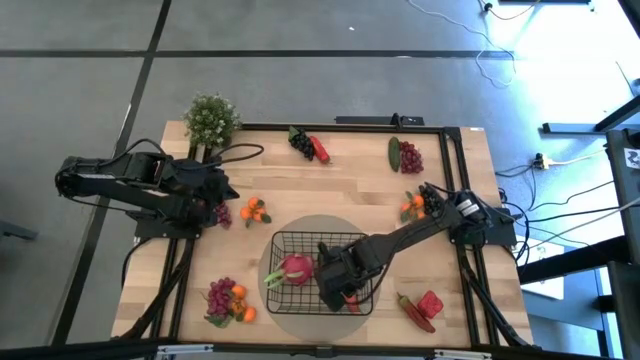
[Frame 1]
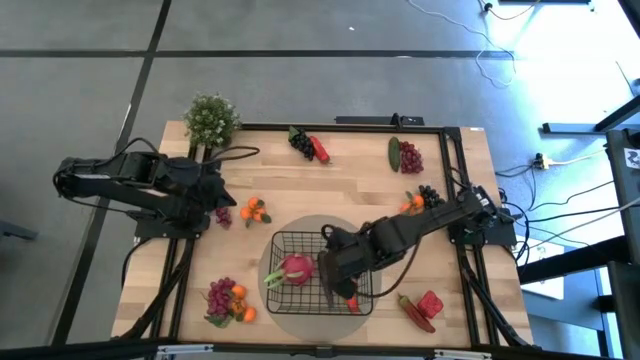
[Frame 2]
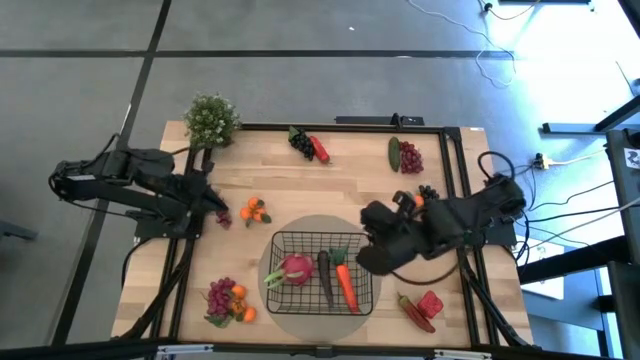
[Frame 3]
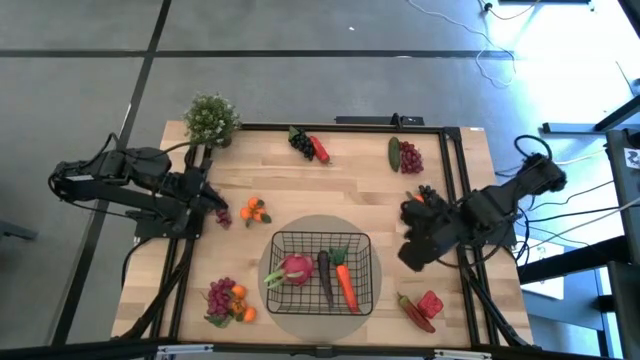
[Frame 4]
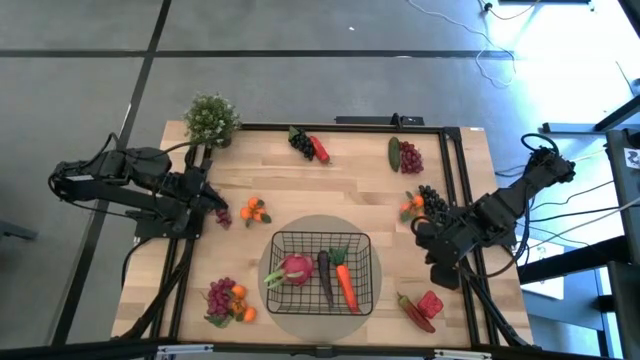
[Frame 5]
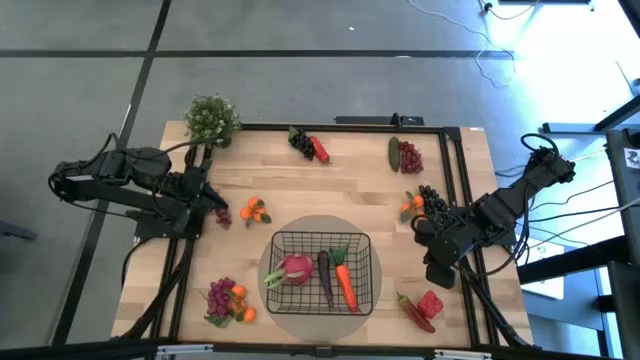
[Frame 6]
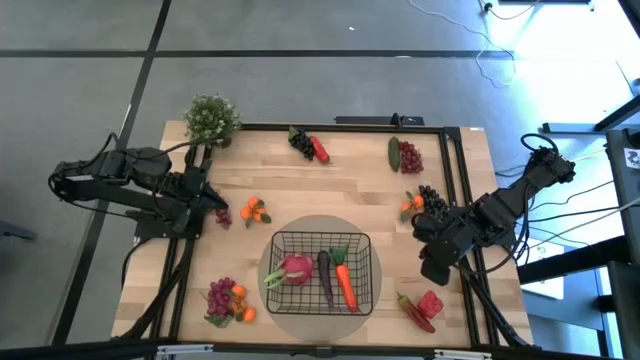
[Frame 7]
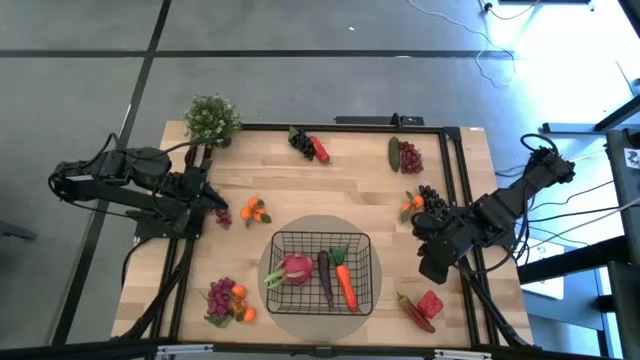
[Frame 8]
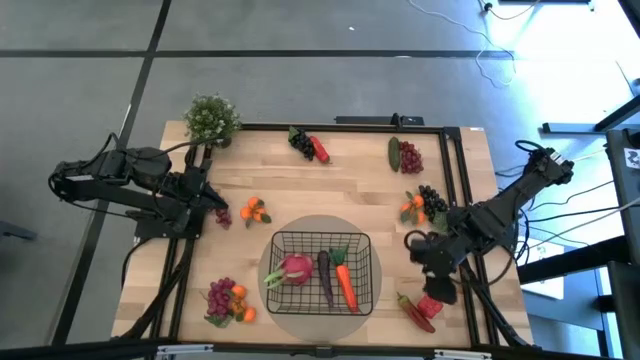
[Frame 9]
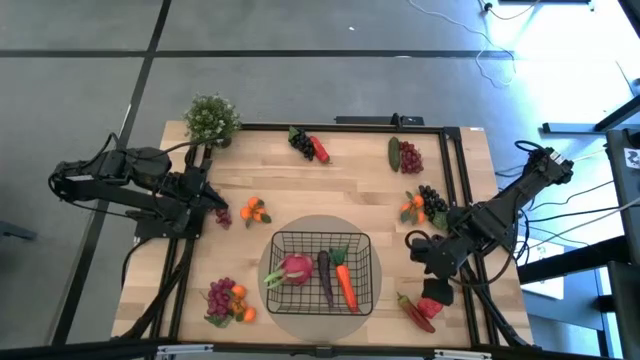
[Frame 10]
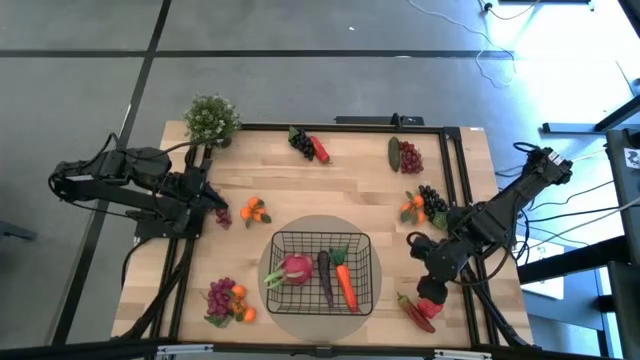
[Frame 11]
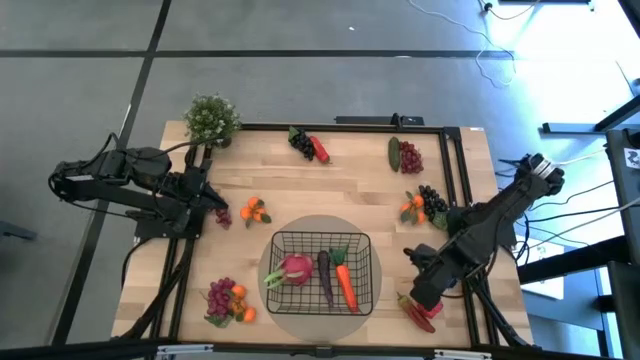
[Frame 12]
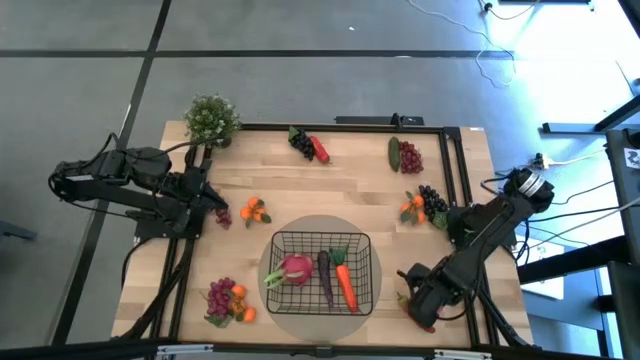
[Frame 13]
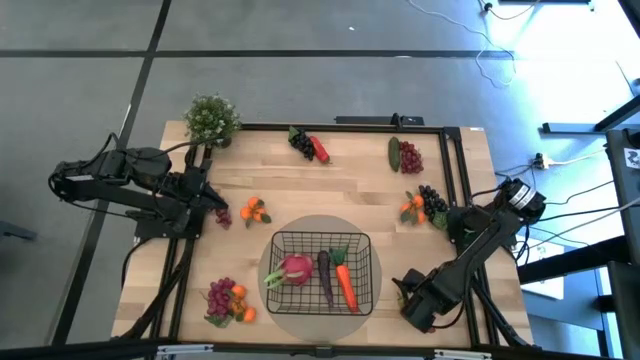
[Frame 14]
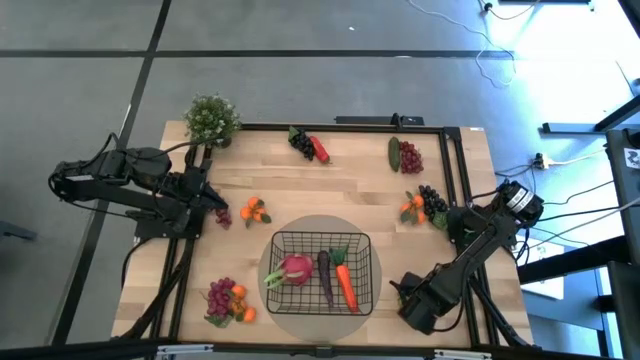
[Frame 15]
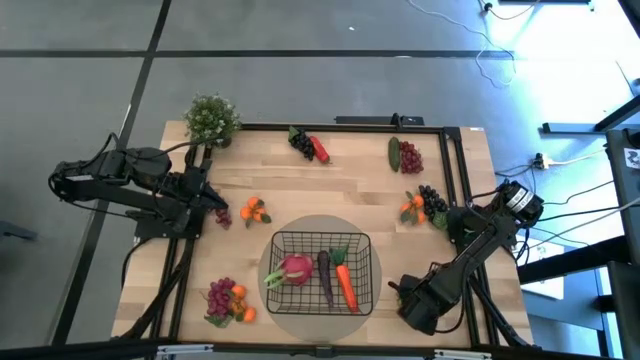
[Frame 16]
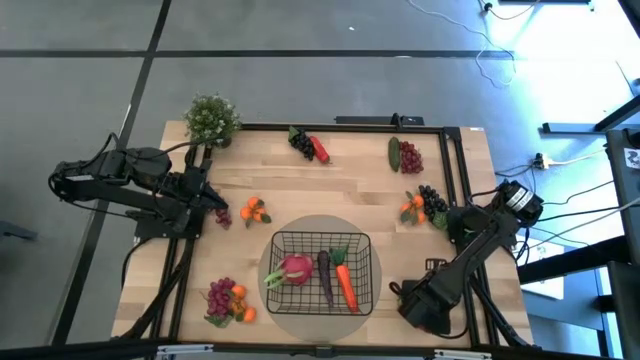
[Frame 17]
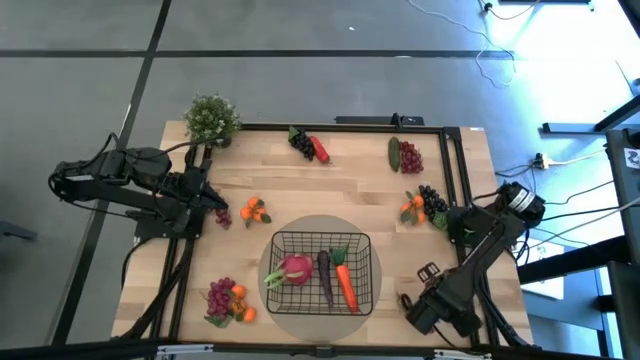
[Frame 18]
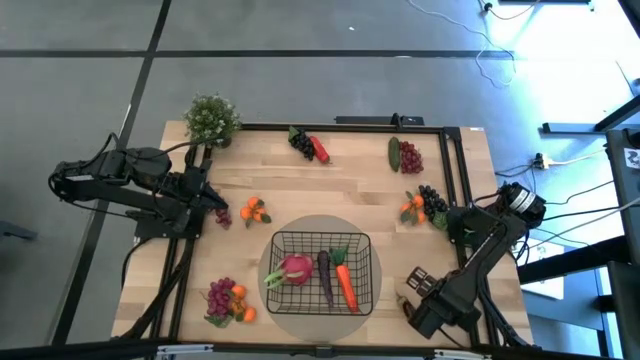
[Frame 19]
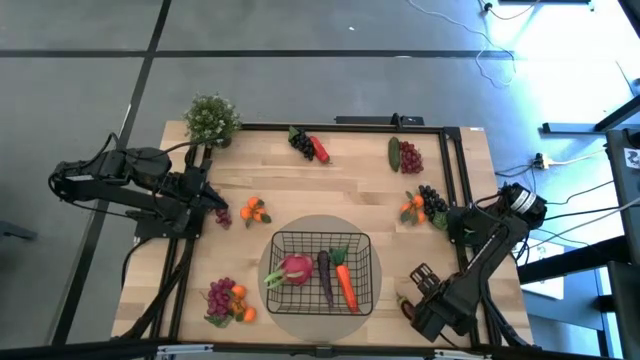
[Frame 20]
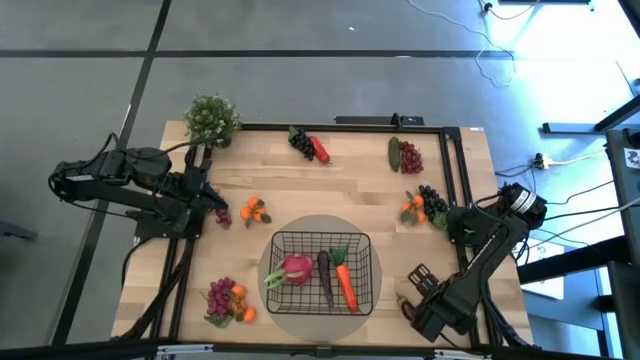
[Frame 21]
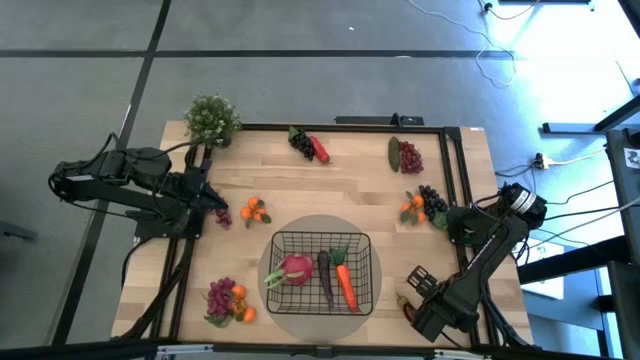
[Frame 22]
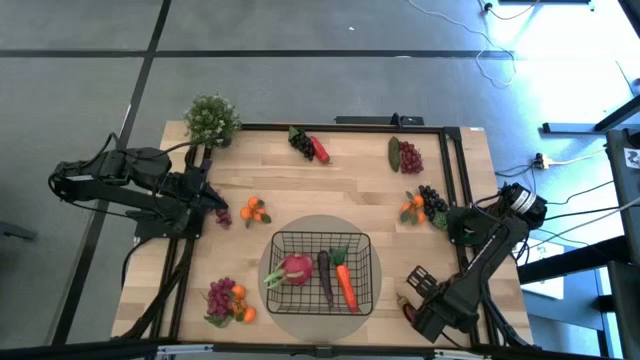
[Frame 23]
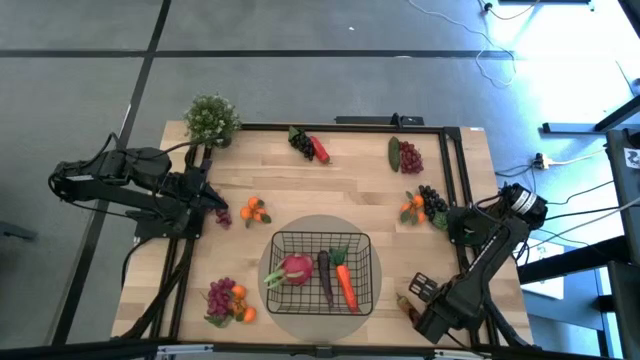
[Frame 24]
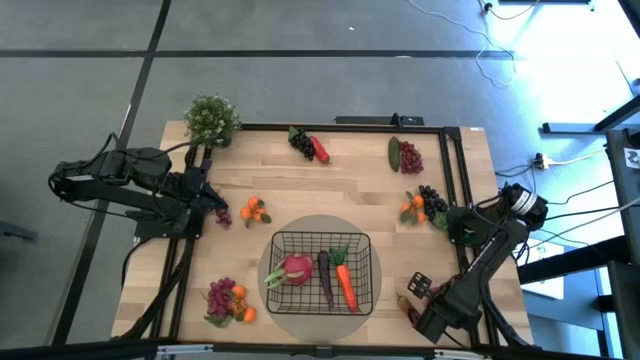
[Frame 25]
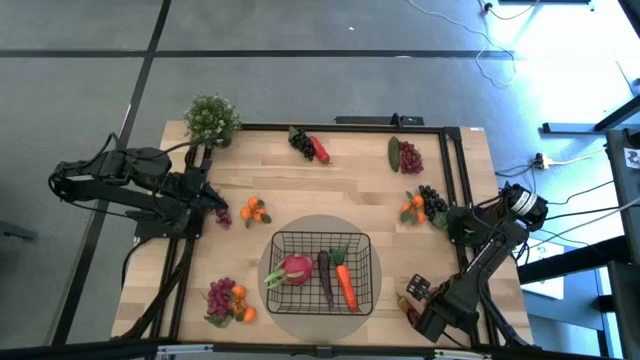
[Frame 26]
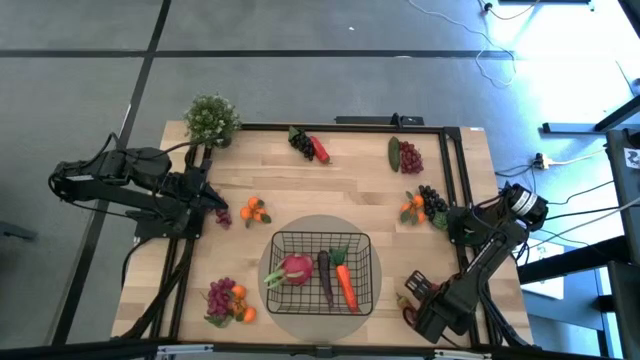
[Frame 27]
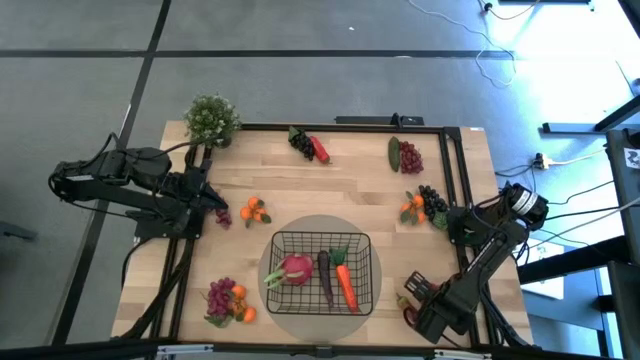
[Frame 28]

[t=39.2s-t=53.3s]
Task: Build produce basket
Put the red bell pepper into the black wire basket

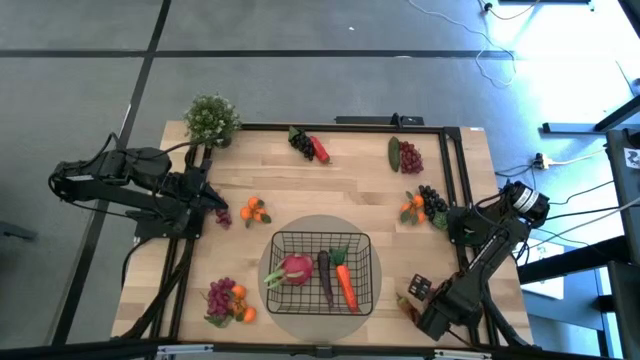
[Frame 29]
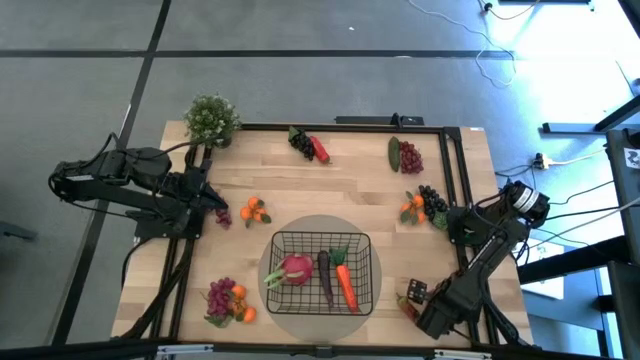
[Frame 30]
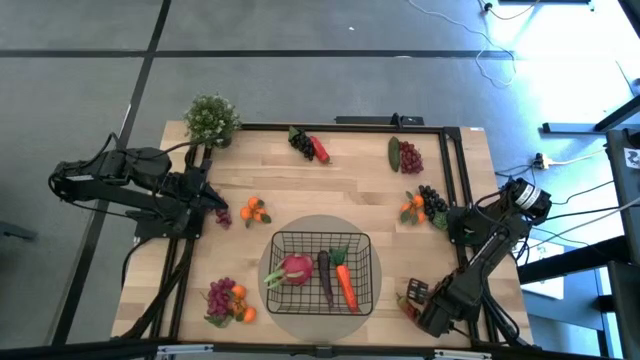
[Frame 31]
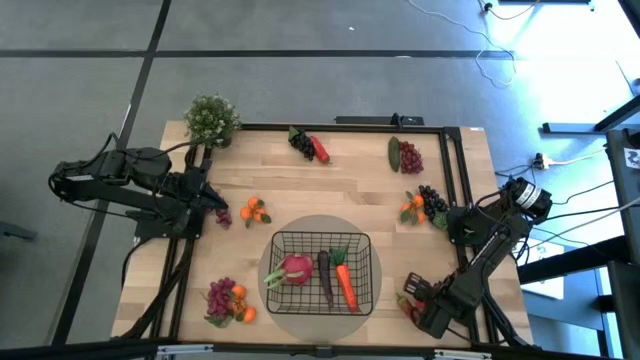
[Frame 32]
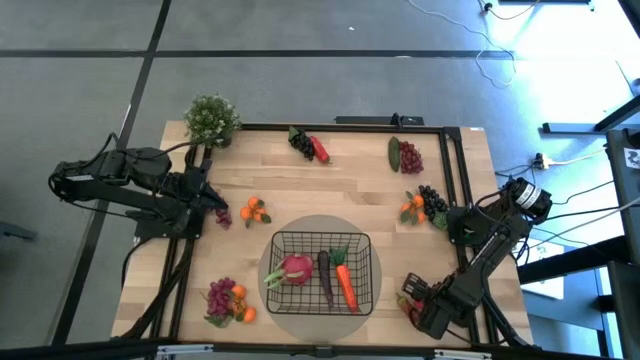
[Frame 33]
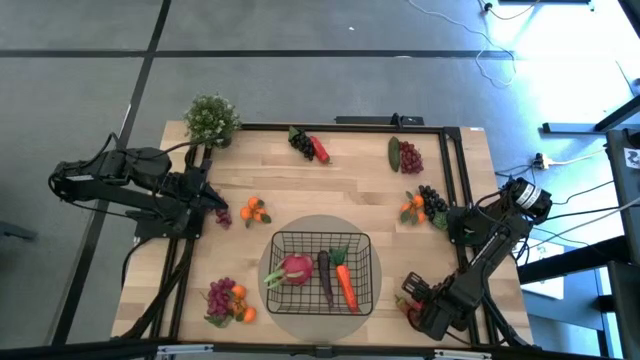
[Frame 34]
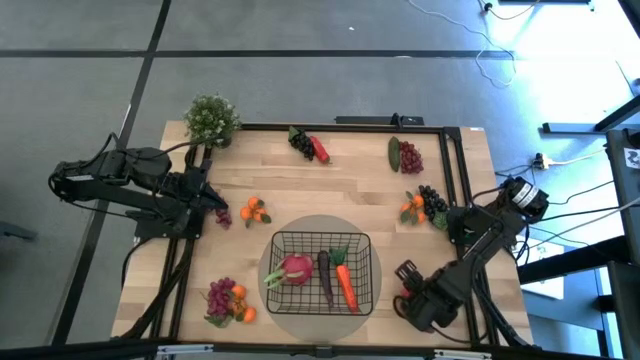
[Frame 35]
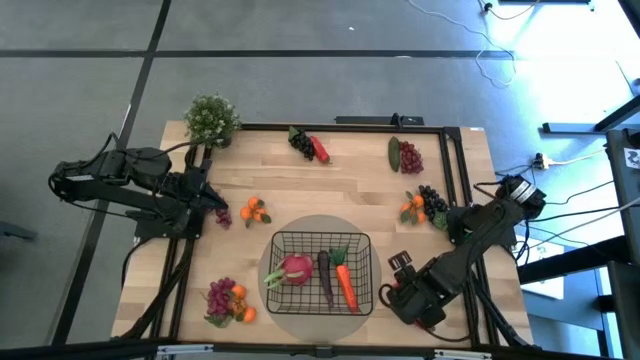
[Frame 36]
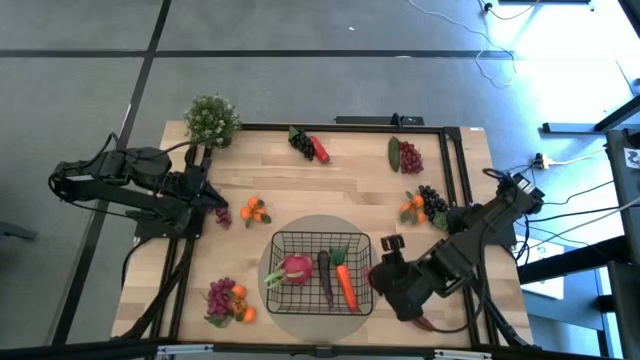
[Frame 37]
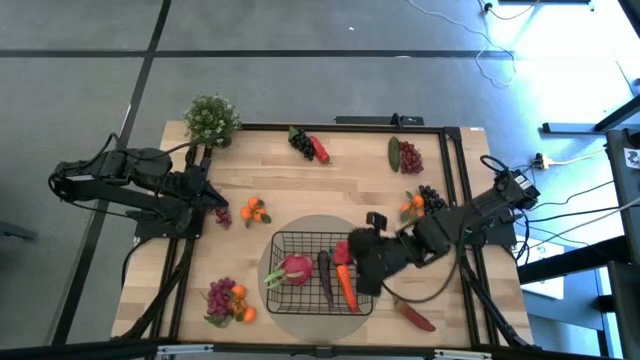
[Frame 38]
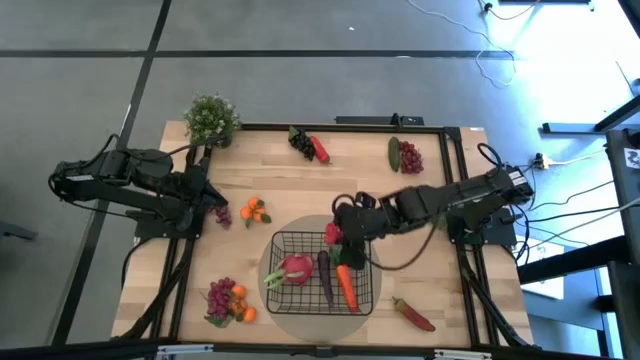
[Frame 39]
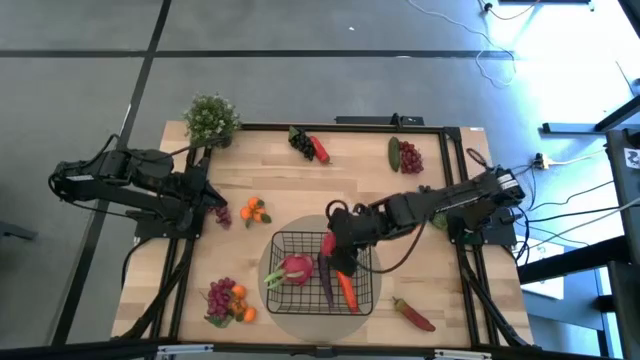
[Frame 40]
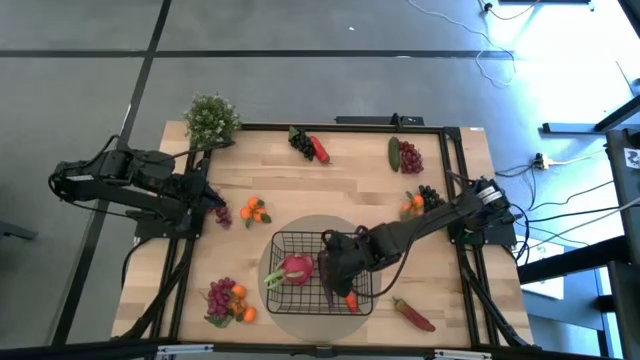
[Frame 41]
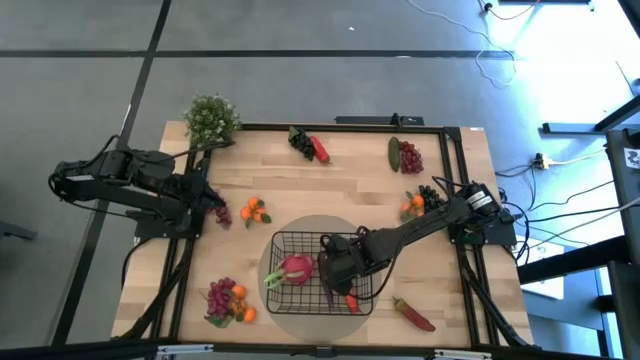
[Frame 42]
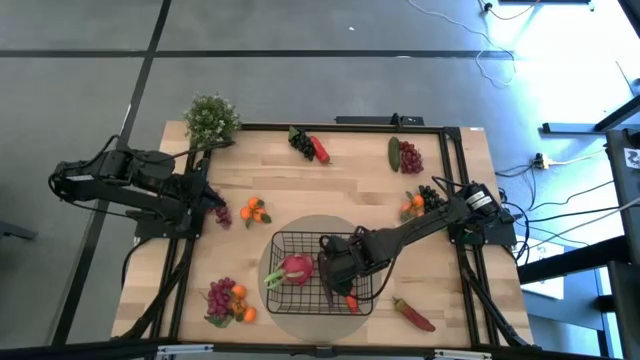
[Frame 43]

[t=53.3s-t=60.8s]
Put the red bell pepper into the black wire basket
